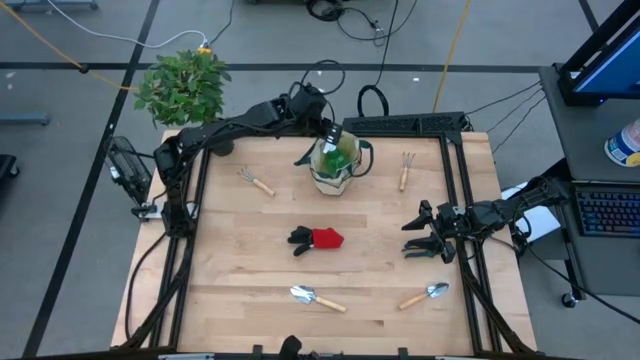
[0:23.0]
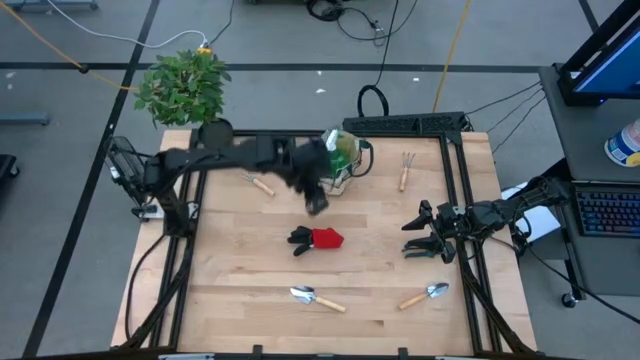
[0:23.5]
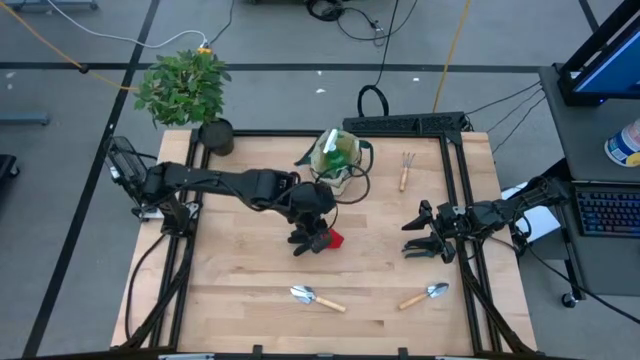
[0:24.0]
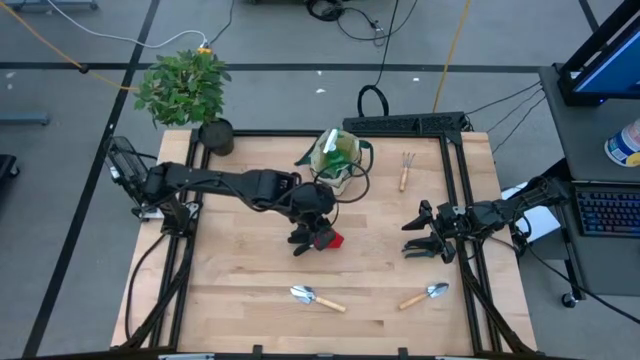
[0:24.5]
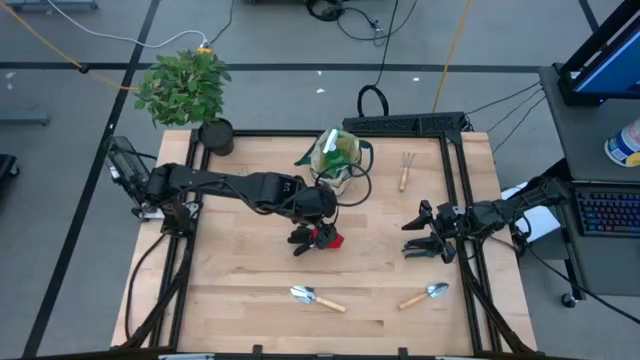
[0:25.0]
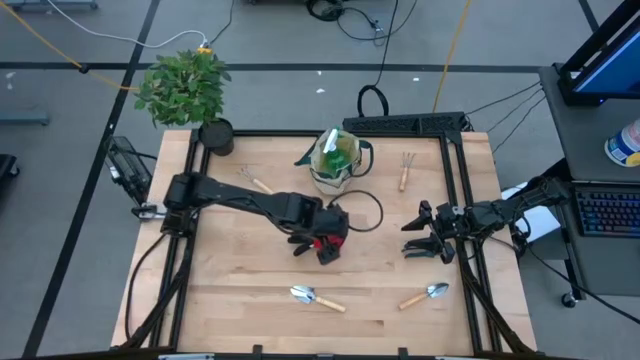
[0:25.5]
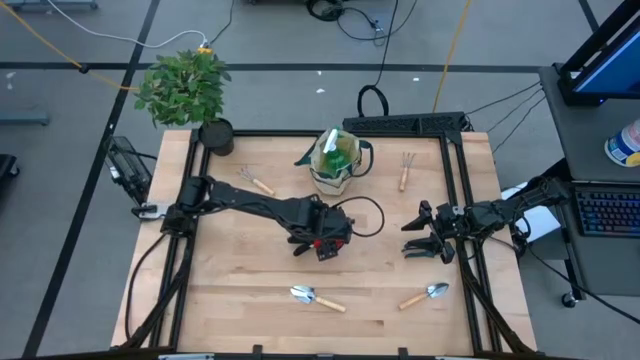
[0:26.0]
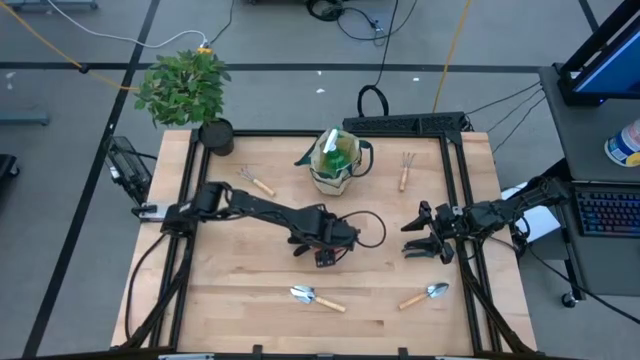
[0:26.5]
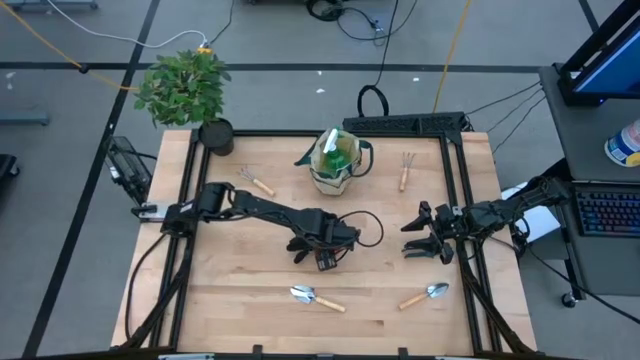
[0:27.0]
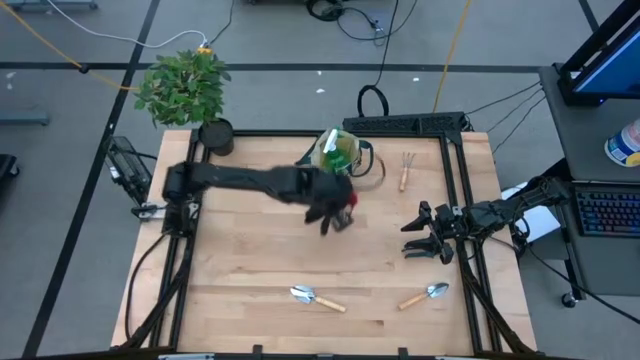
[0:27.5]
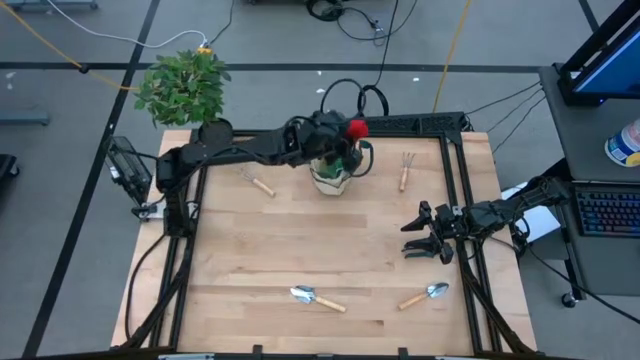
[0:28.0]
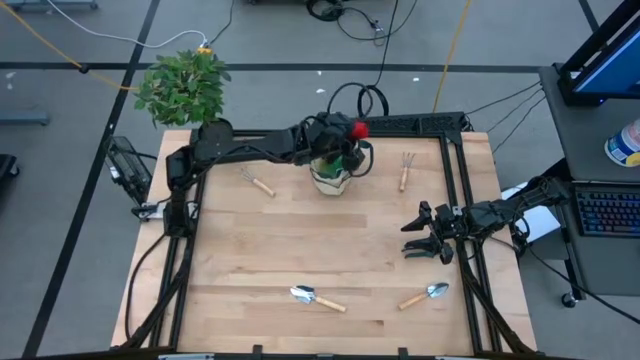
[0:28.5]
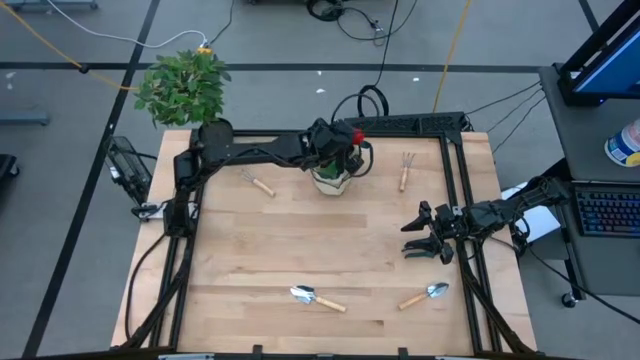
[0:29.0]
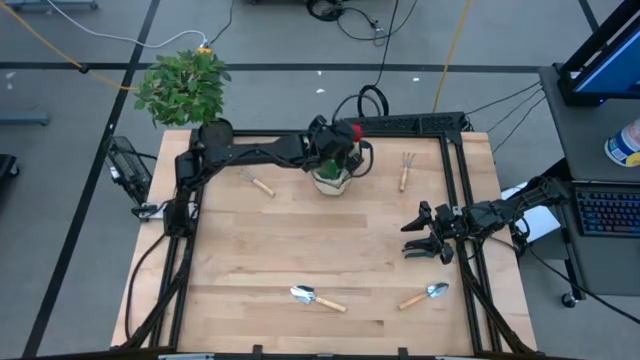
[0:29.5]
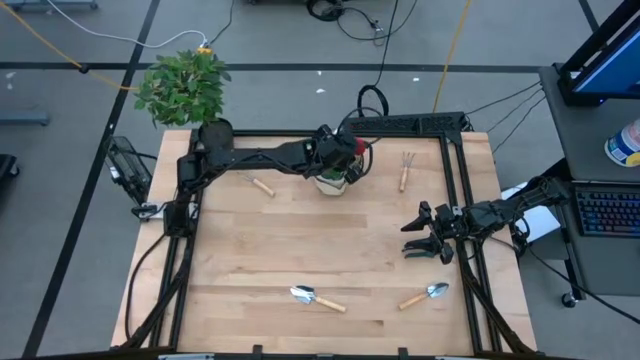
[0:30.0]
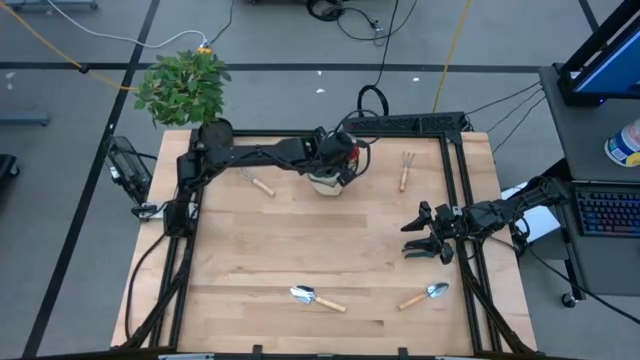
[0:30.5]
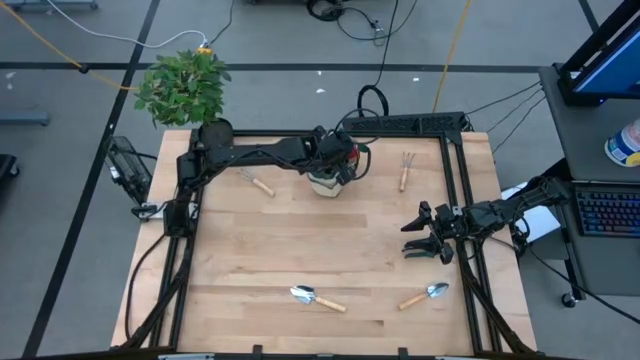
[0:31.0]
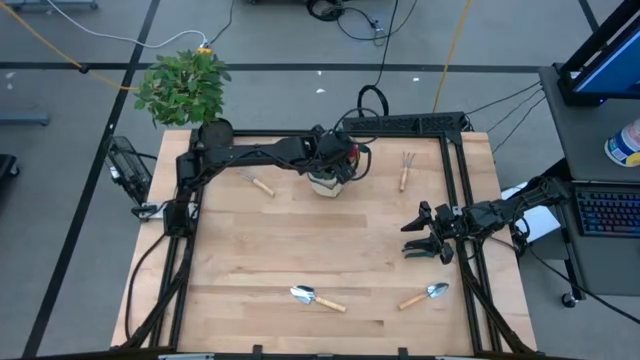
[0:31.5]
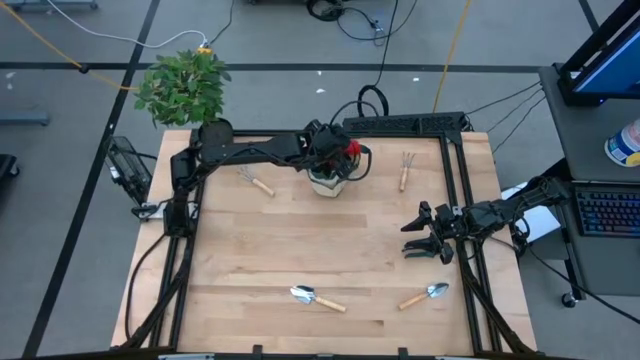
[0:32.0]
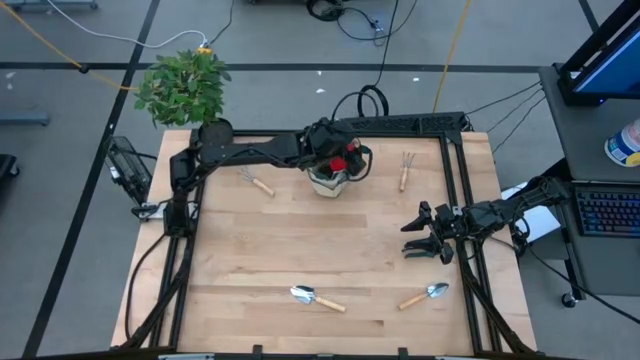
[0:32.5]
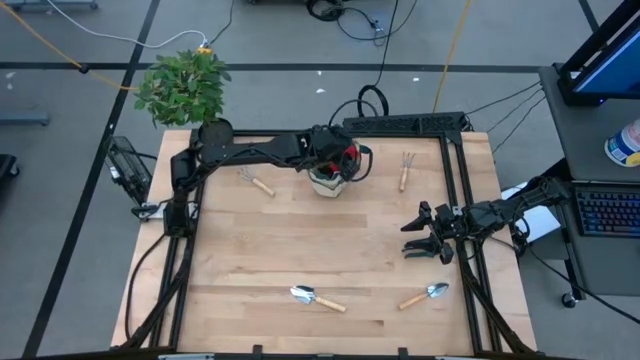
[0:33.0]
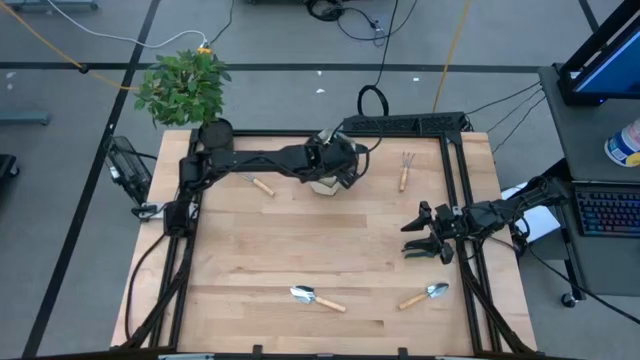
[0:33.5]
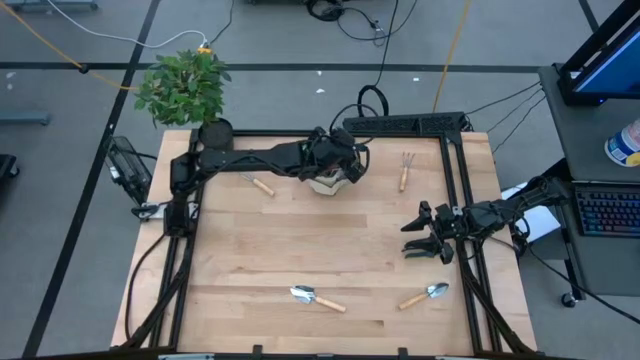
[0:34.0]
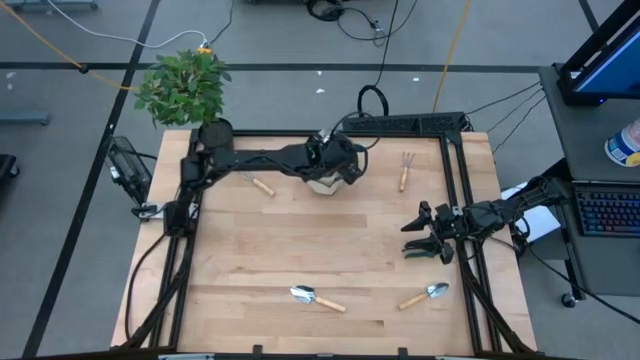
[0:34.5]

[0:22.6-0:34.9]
Task: Pick & Place Garden tools in Gardening bag
Put the gloves into the gardening tool bag

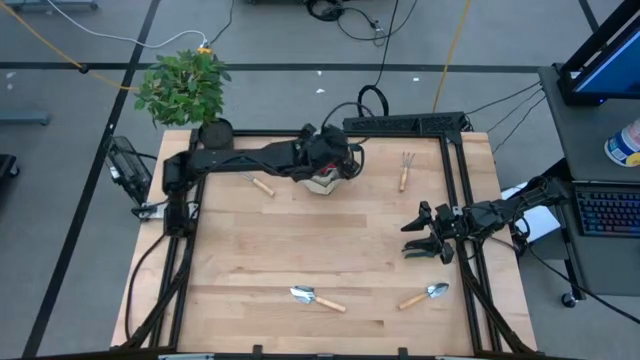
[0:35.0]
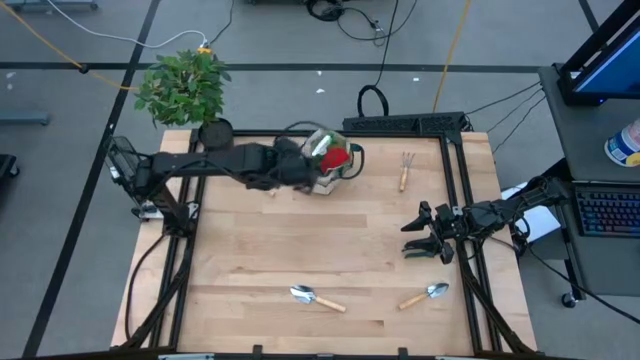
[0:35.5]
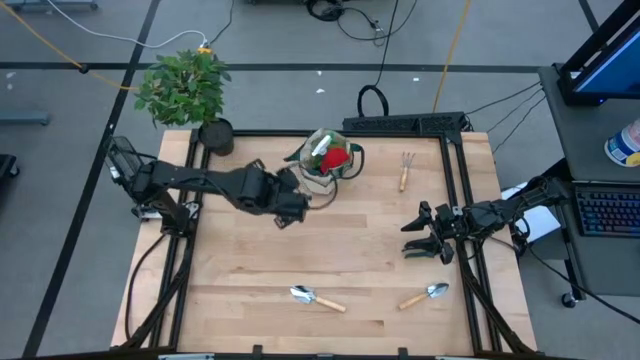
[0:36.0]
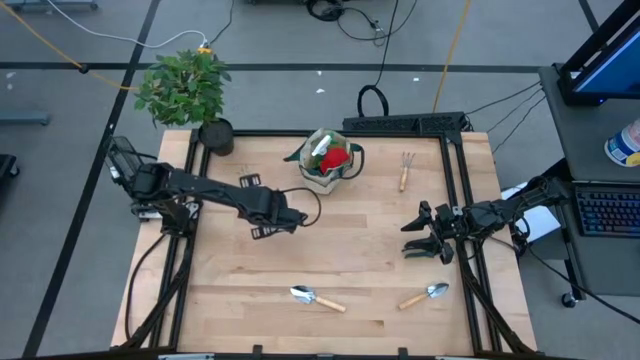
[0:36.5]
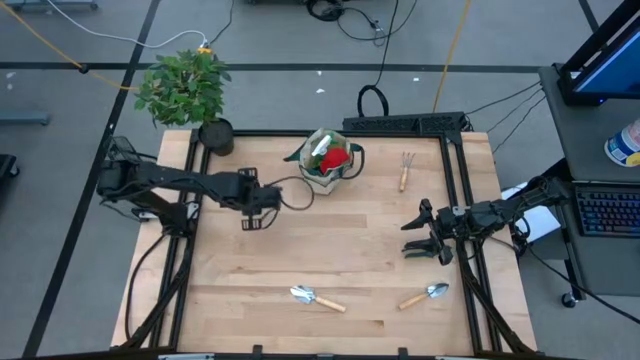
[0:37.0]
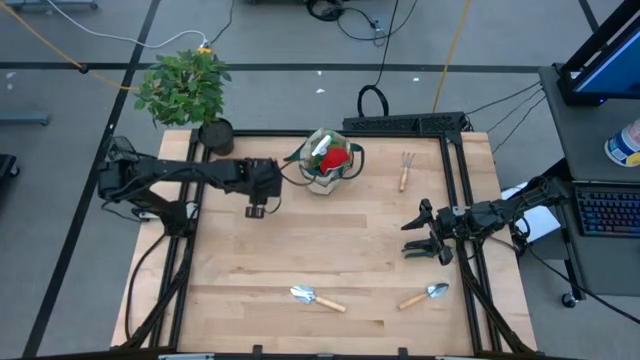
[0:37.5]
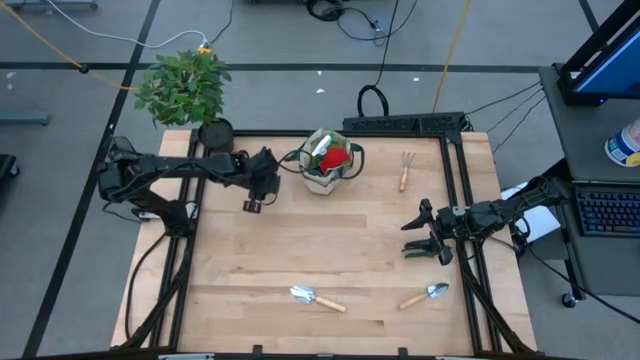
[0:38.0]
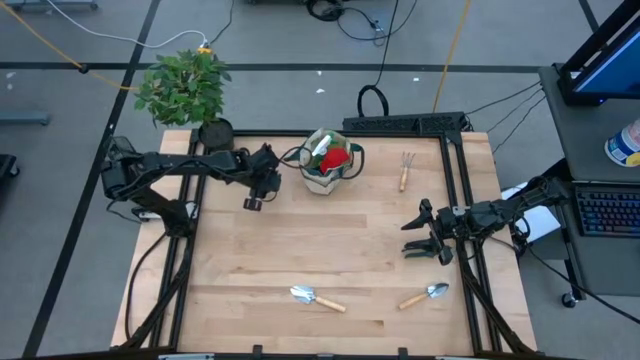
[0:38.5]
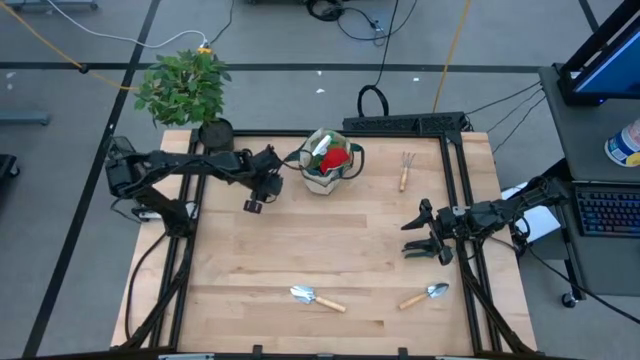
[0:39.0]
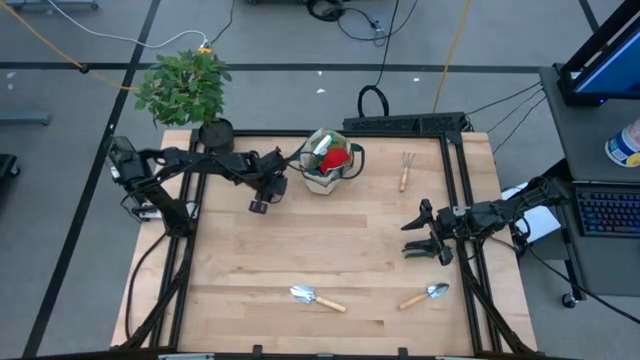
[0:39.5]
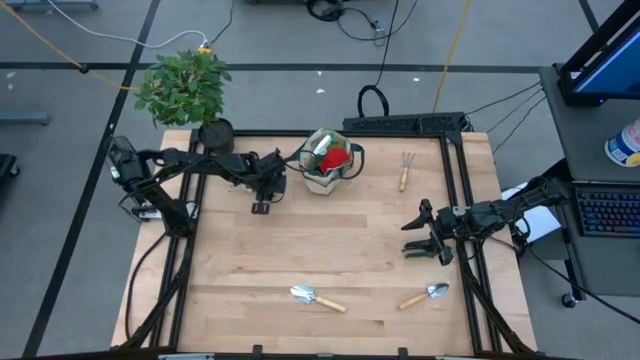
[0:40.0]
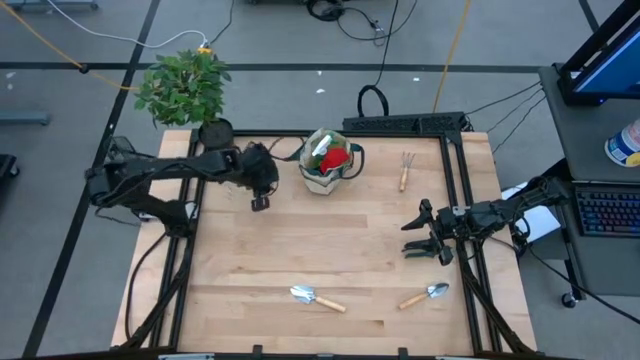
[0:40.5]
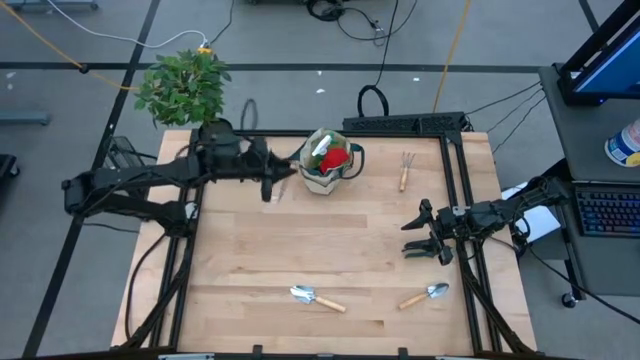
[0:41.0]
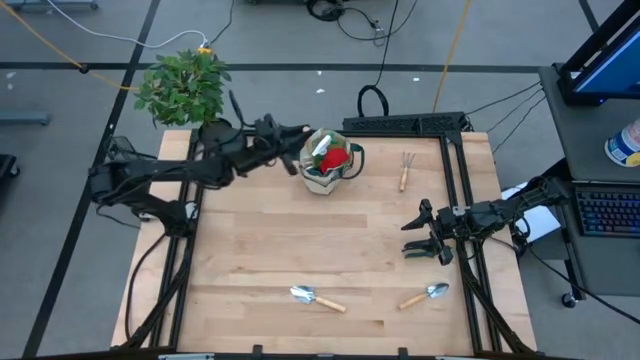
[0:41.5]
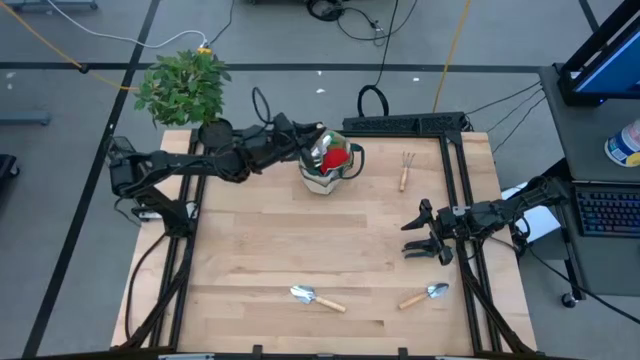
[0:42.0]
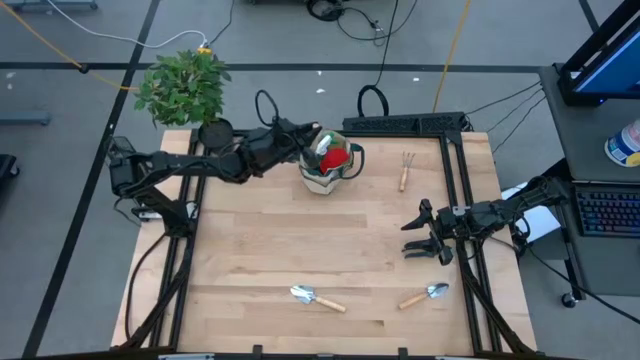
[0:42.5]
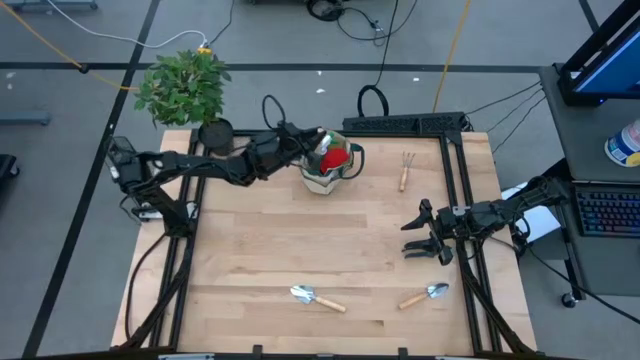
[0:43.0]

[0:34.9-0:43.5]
Put the left gardening fork into the gardening tool bag
